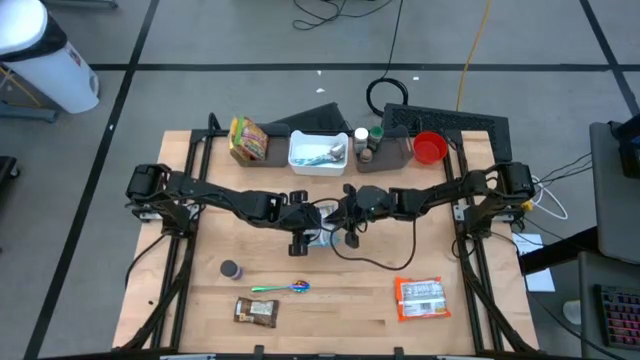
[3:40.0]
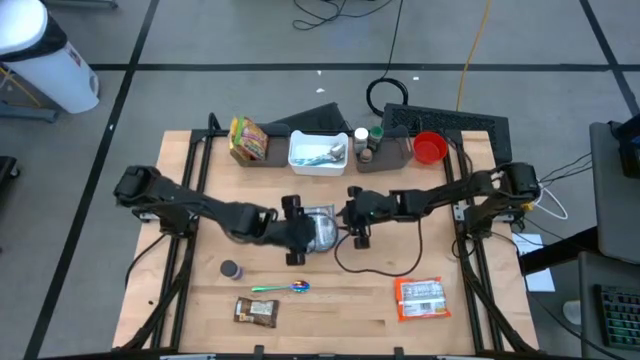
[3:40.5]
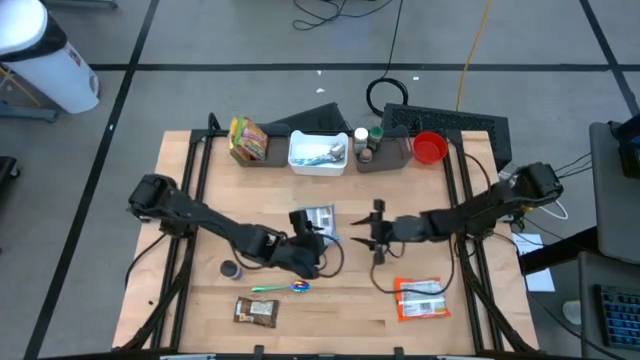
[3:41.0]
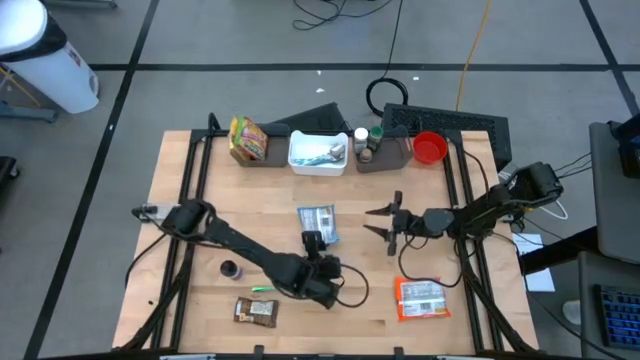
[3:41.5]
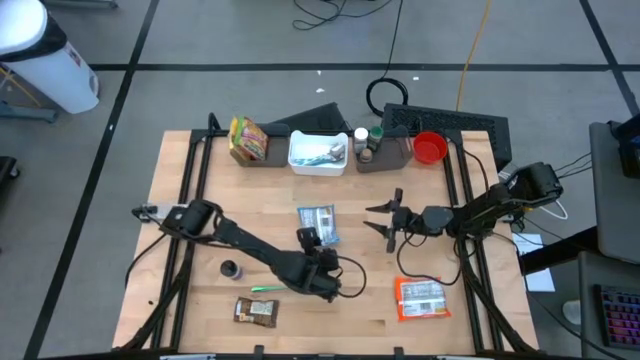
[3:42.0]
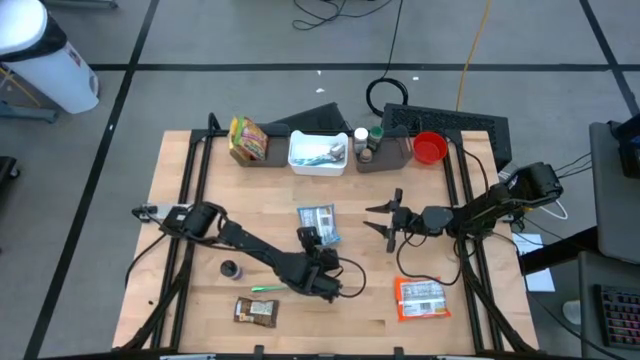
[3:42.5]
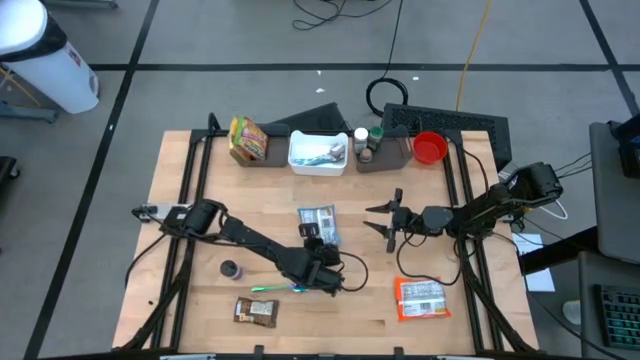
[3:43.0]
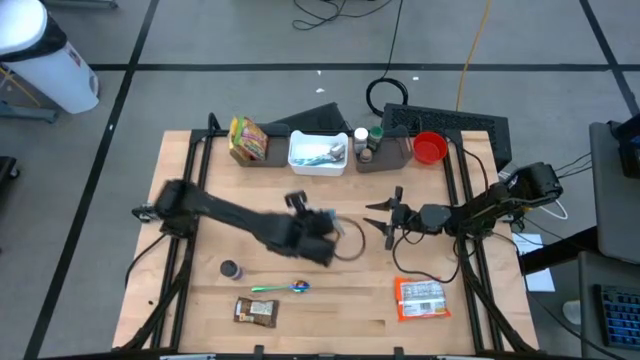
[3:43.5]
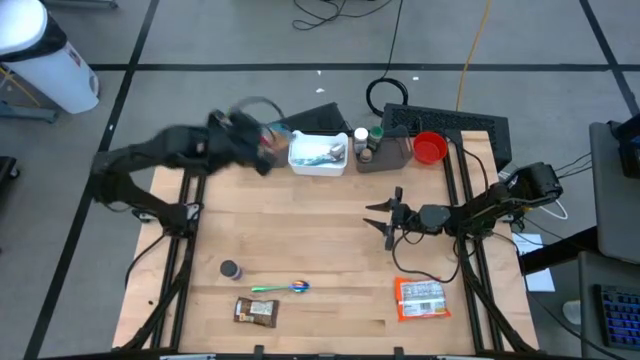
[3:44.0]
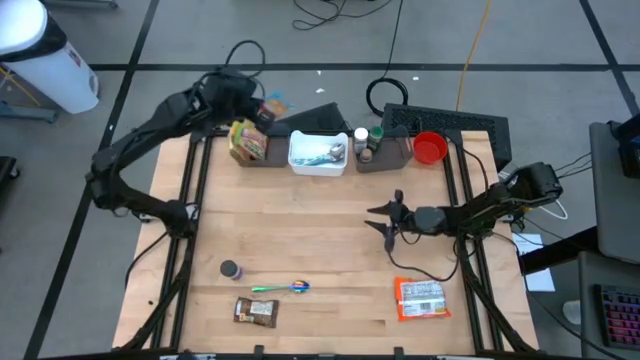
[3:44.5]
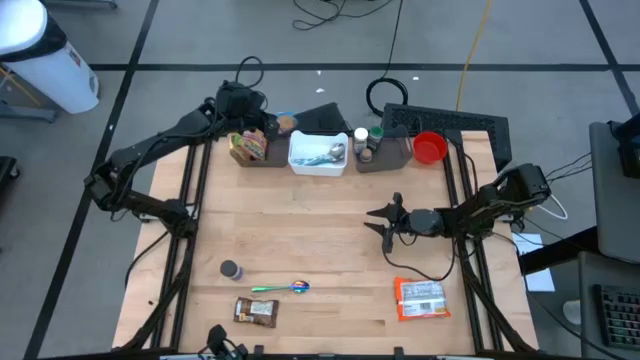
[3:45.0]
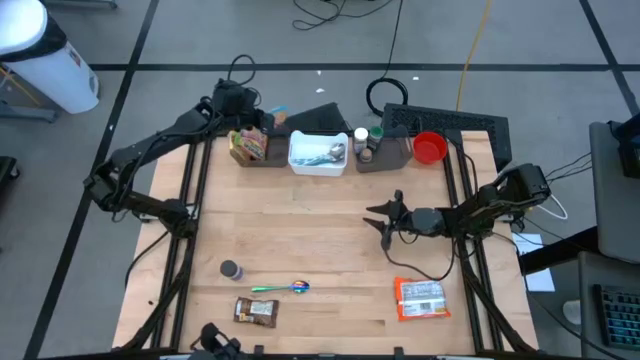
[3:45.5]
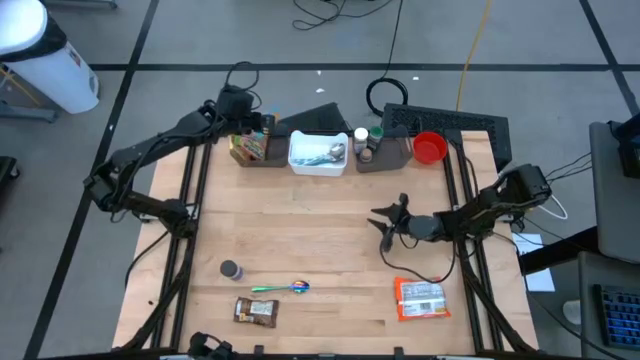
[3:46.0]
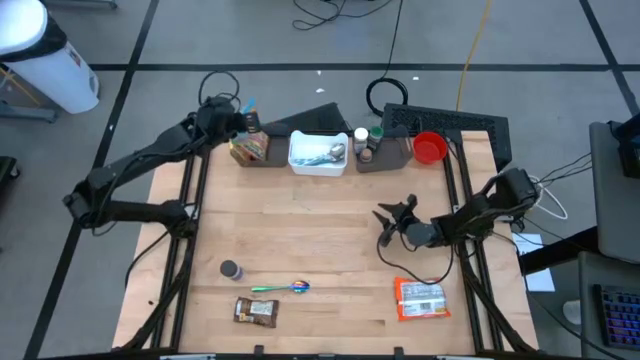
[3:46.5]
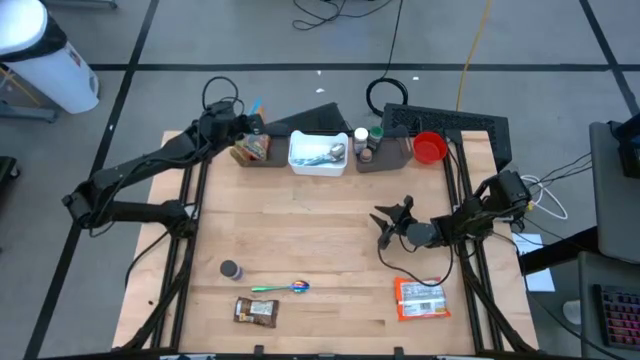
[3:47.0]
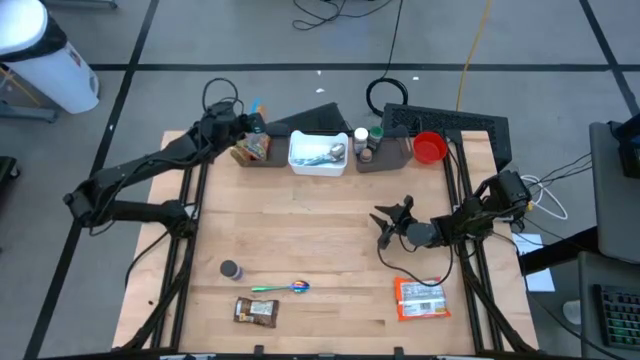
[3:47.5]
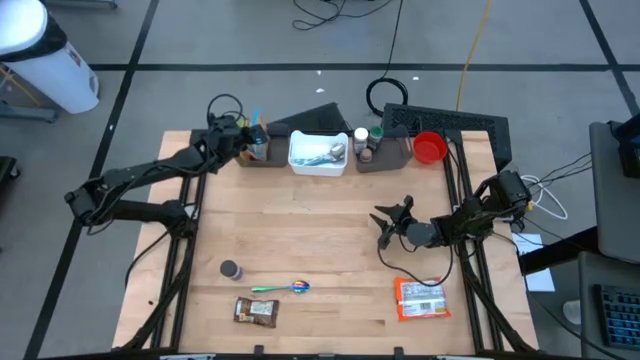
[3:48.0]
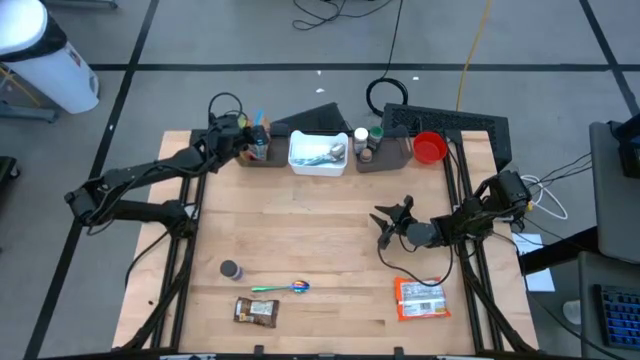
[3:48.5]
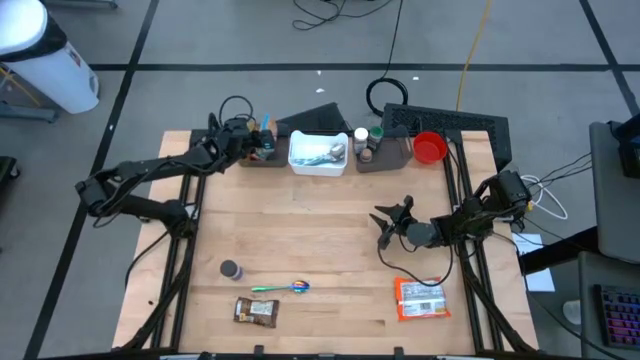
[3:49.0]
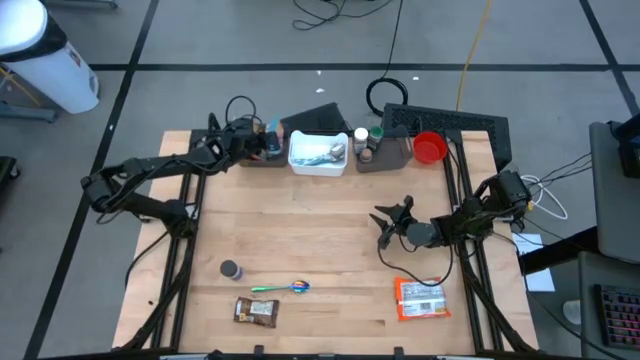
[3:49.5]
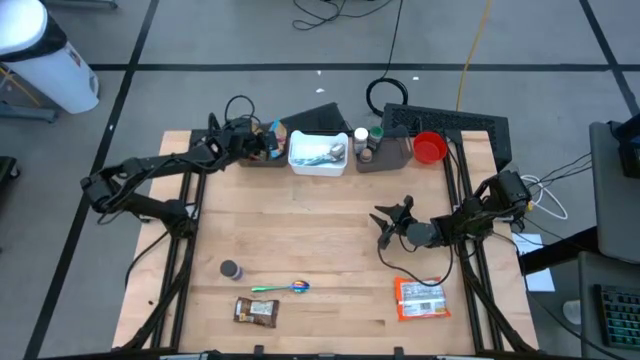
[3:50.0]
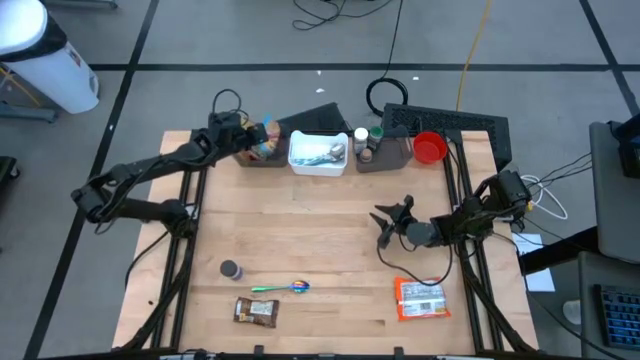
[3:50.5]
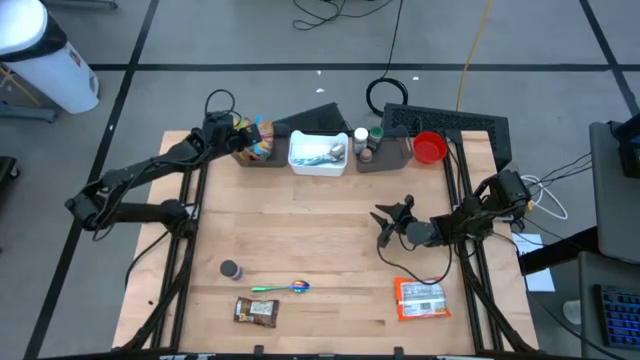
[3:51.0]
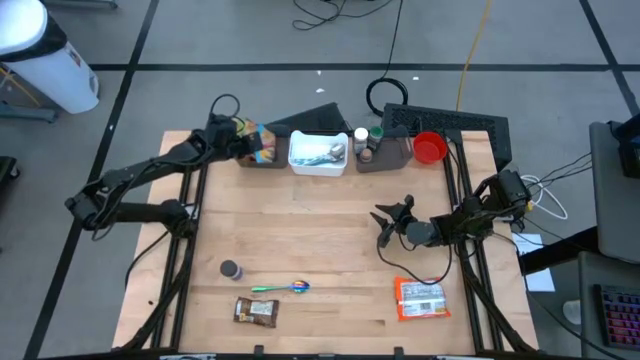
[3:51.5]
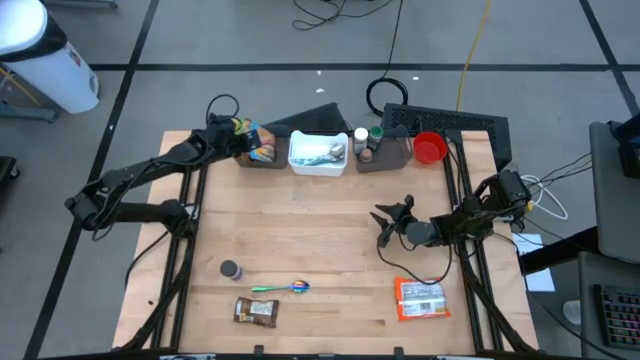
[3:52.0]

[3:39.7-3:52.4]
Task: Pick & Place Food Item
Put the blue noodle pack into the left black bin

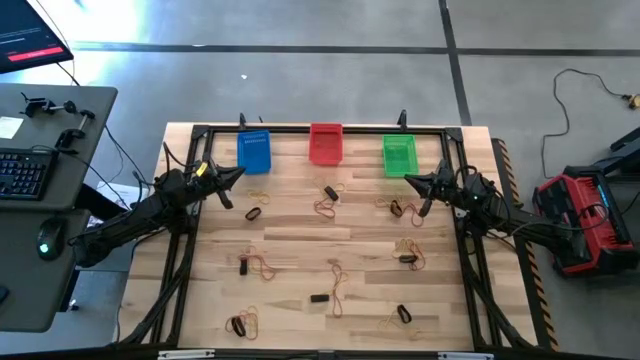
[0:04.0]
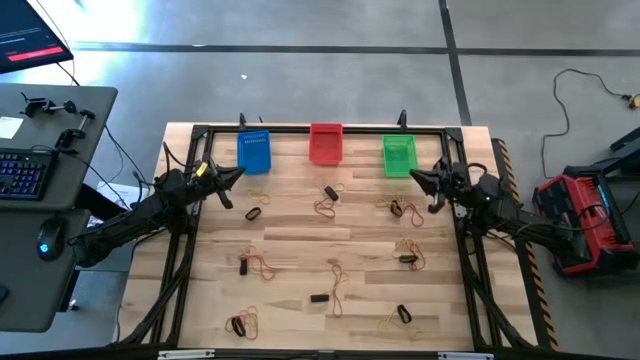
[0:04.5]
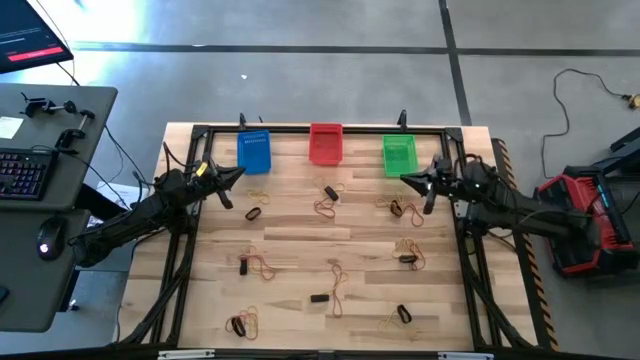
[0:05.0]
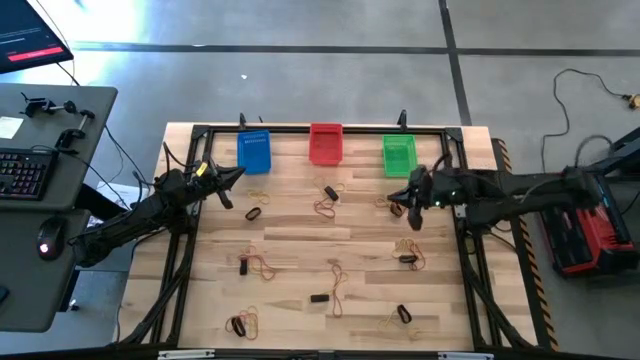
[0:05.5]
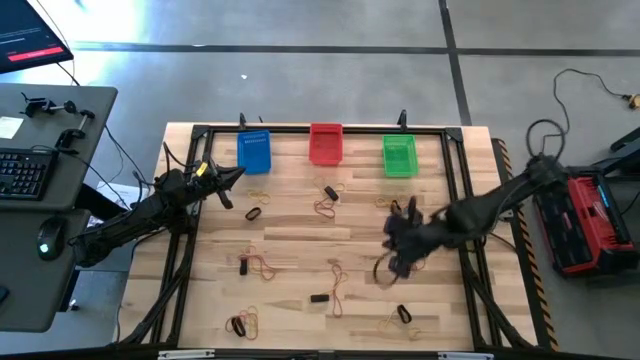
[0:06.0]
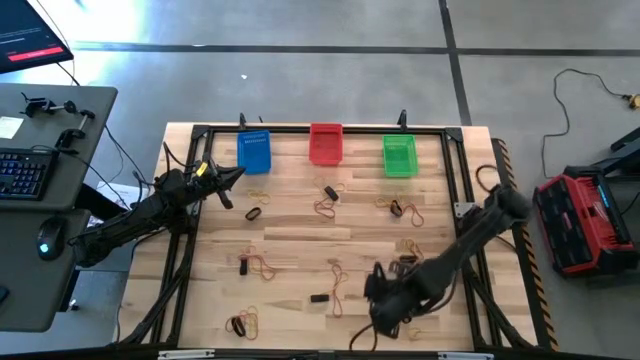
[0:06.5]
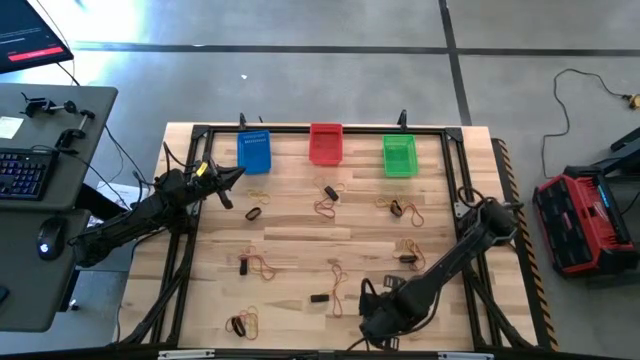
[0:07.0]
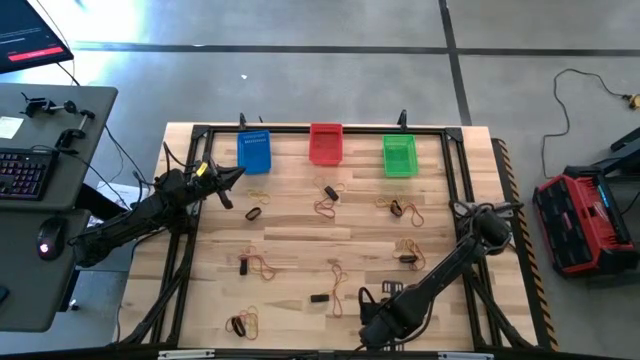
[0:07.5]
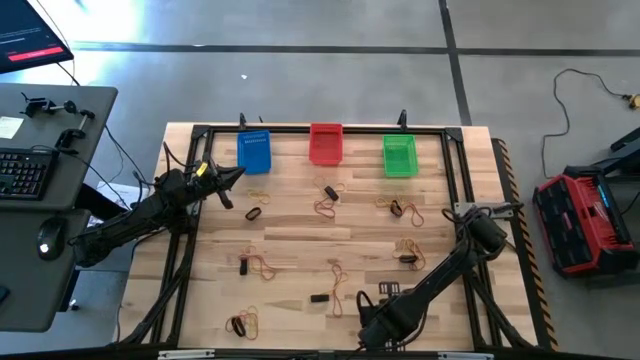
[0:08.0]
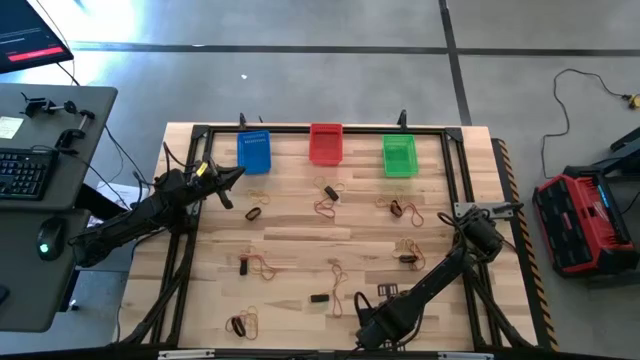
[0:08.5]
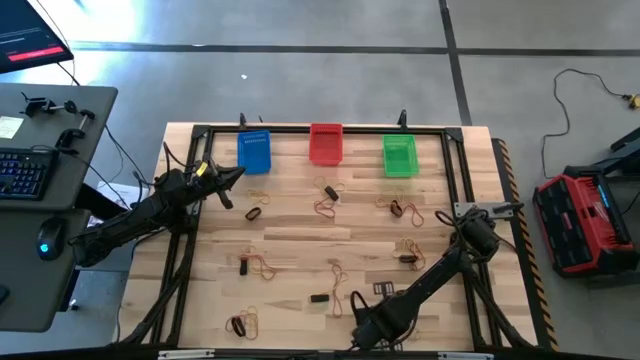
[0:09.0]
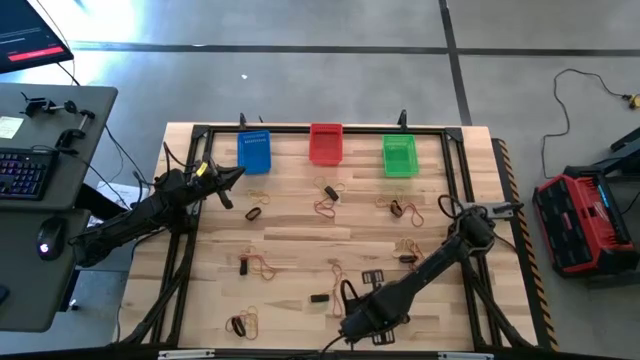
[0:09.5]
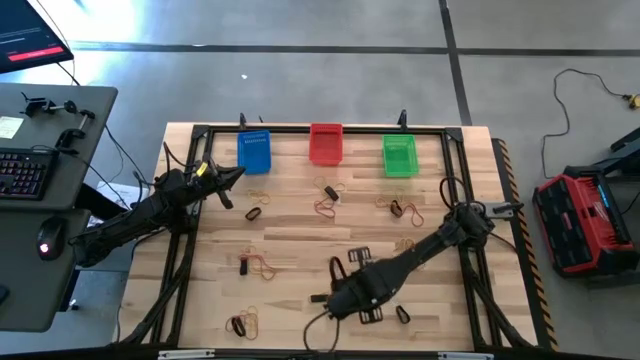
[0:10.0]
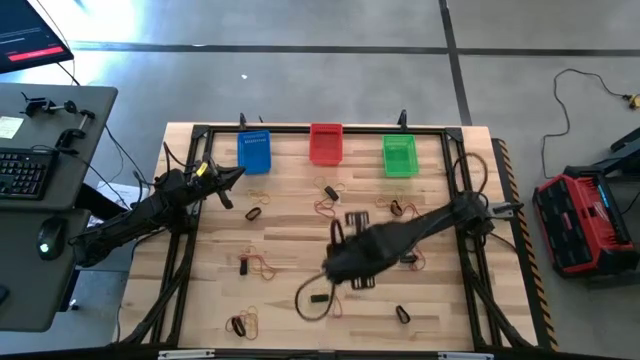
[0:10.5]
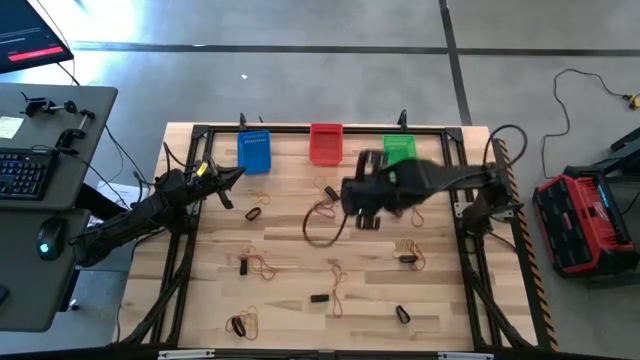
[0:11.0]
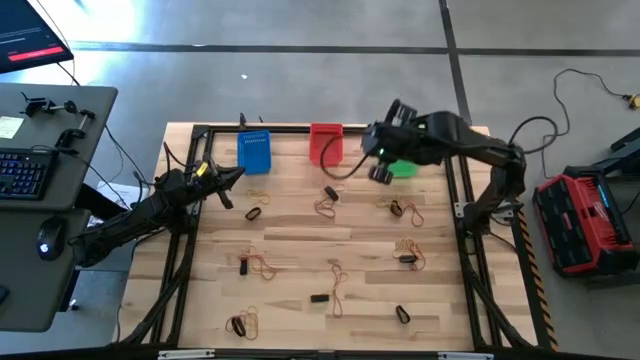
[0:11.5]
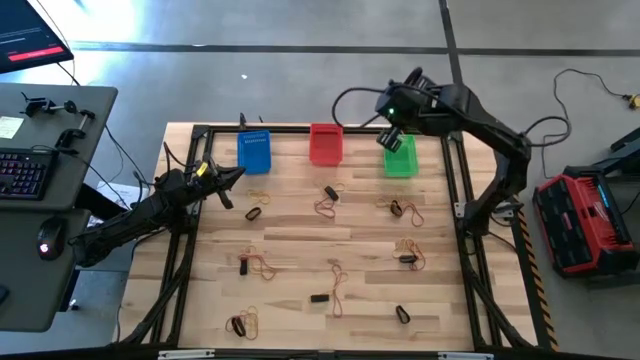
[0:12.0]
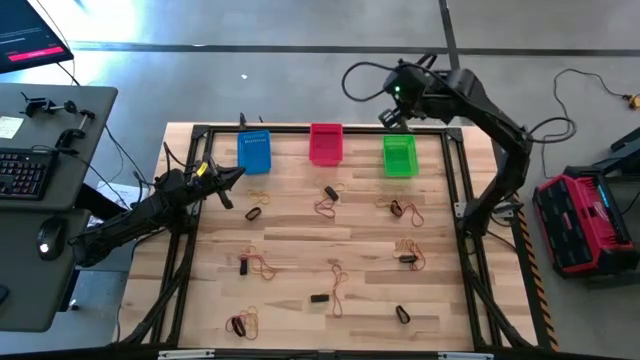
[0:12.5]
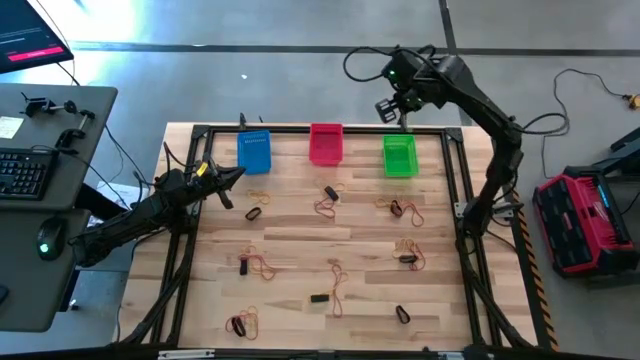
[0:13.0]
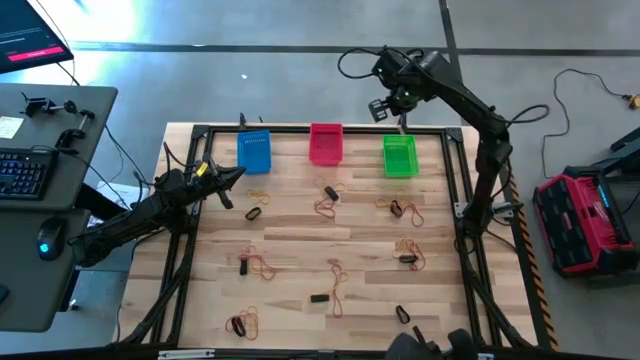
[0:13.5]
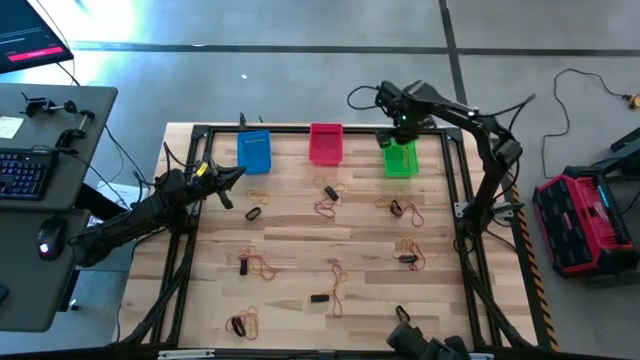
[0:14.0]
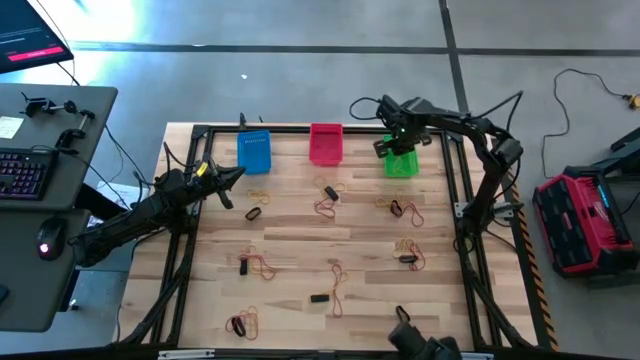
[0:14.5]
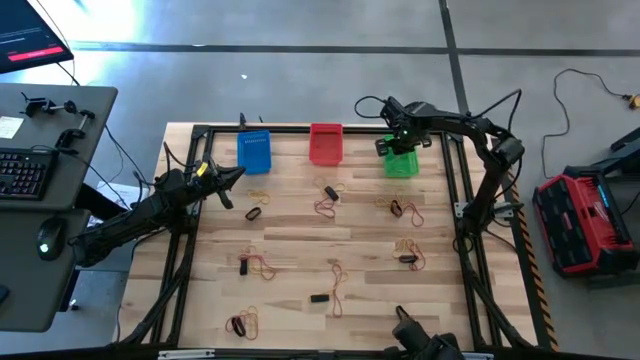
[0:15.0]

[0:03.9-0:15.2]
Task: Sort rubber bands into baskets
Put the yellow rubber band into the green bin
